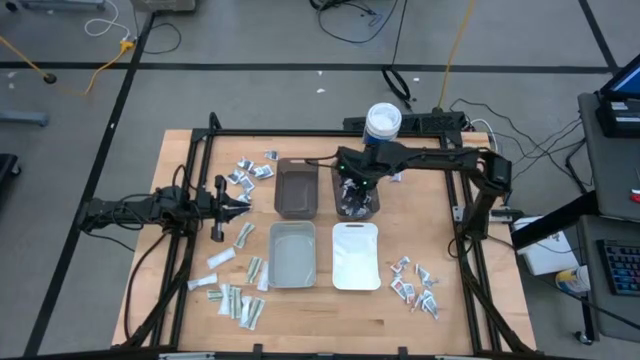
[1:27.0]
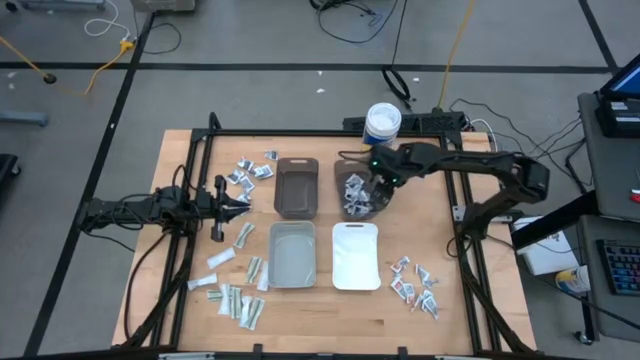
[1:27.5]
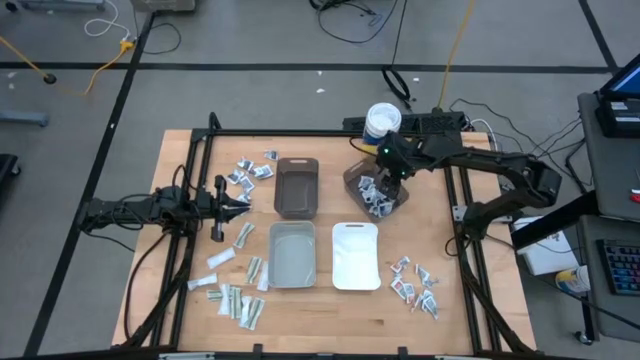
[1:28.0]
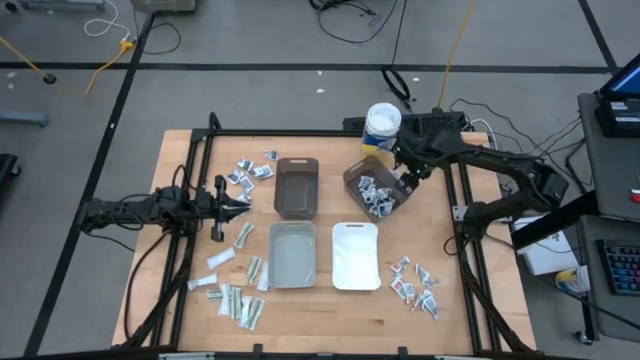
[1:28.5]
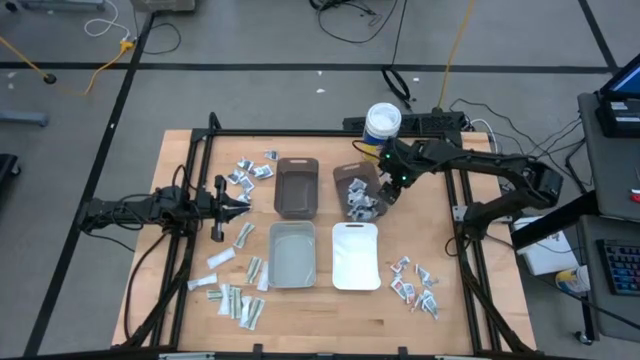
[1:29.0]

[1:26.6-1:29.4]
Task: Pick & Place First Aid Supplies
Adjust the right black bin on the table

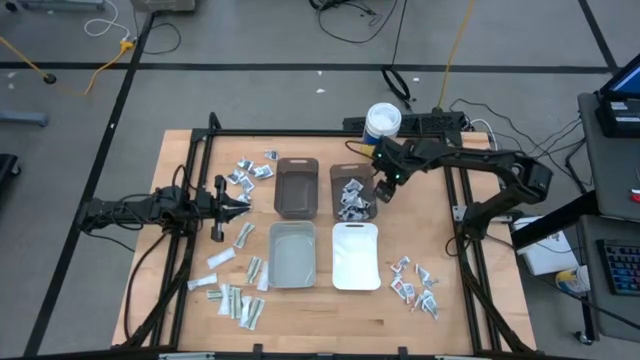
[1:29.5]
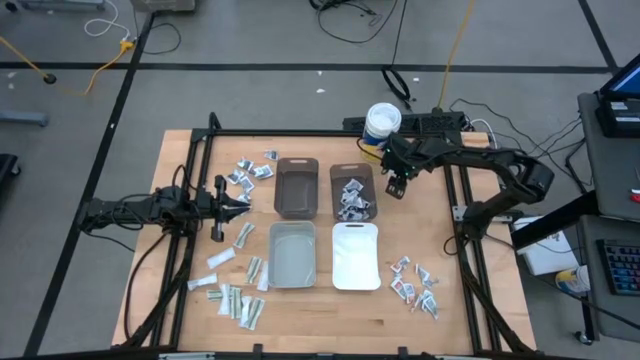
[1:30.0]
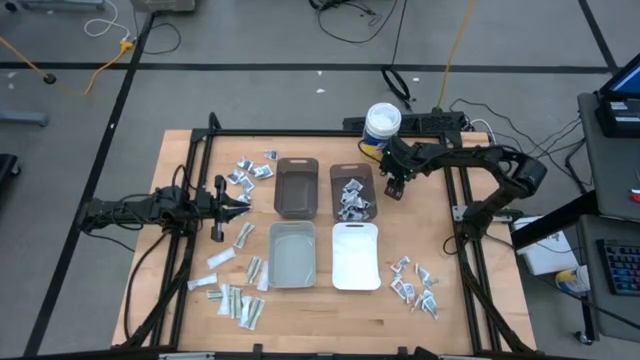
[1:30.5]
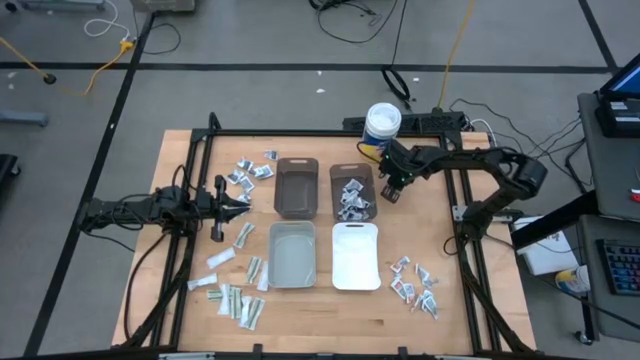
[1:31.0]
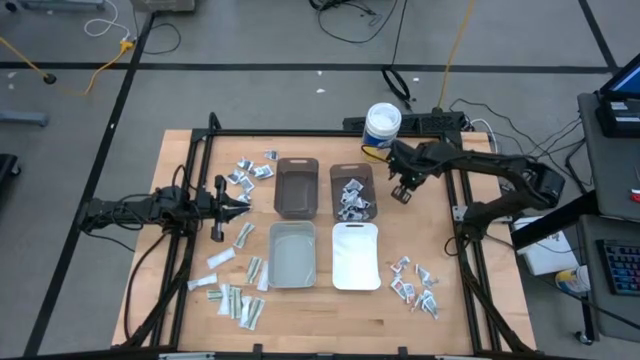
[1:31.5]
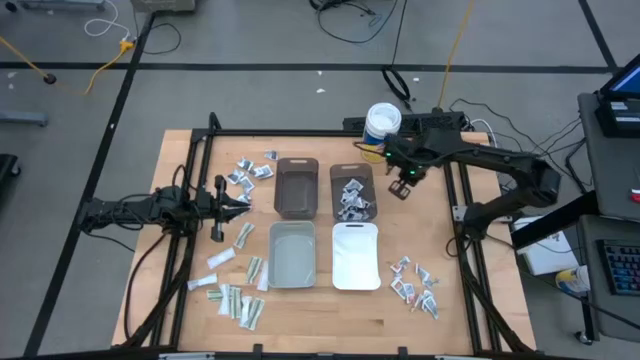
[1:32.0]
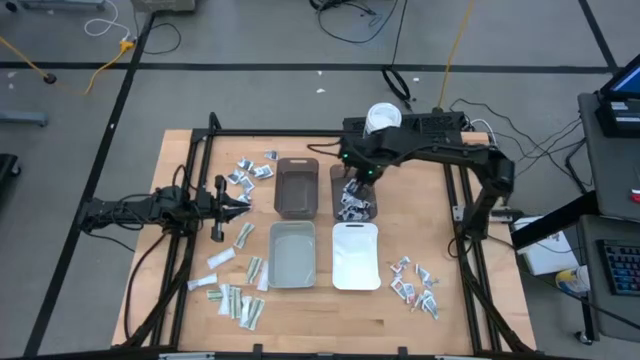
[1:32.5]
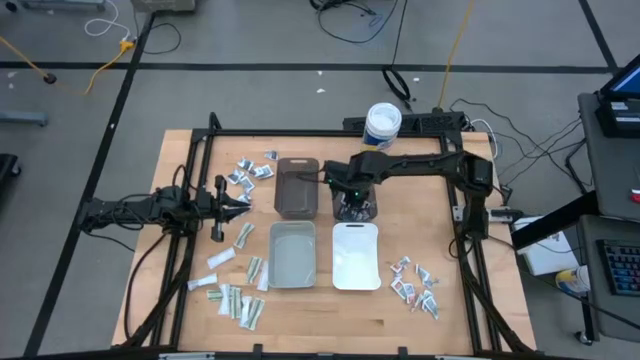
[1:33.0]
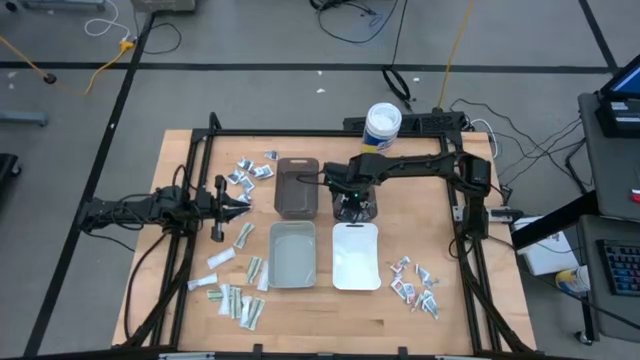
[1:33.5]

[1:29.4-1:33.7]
Put the blue pad into the right black bin

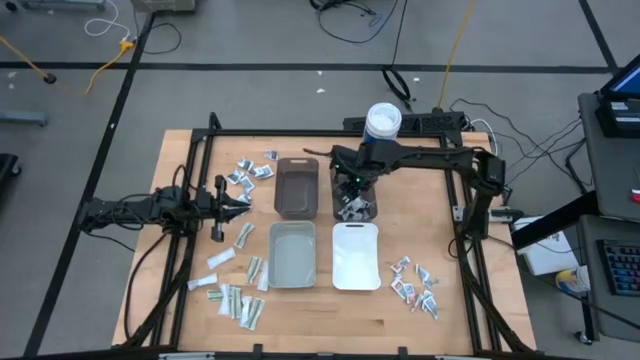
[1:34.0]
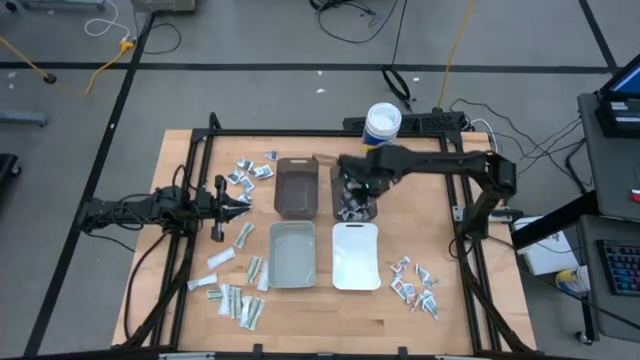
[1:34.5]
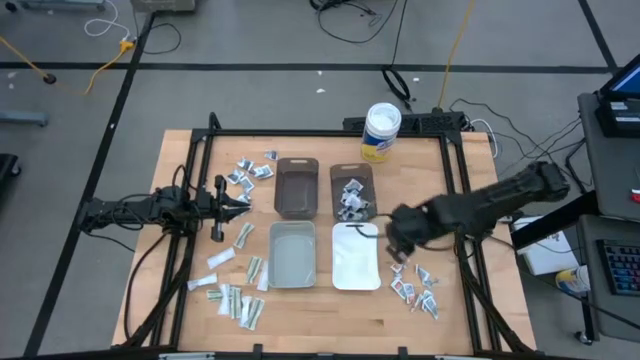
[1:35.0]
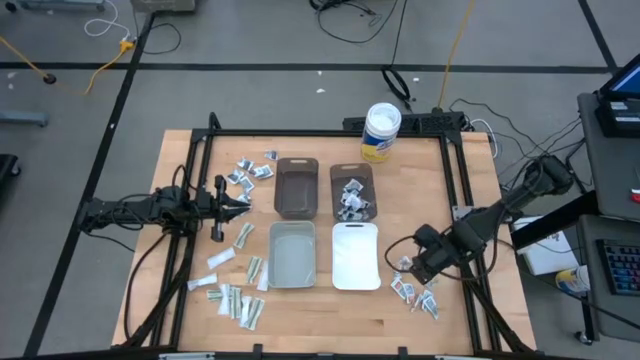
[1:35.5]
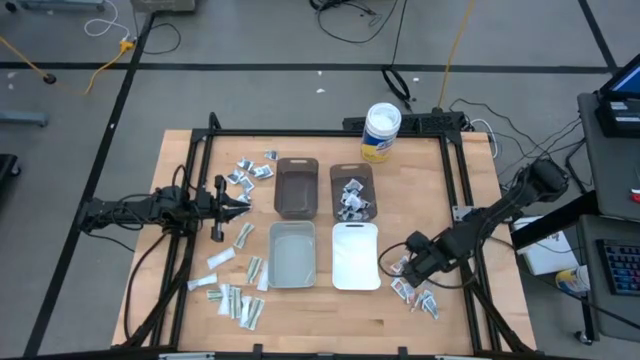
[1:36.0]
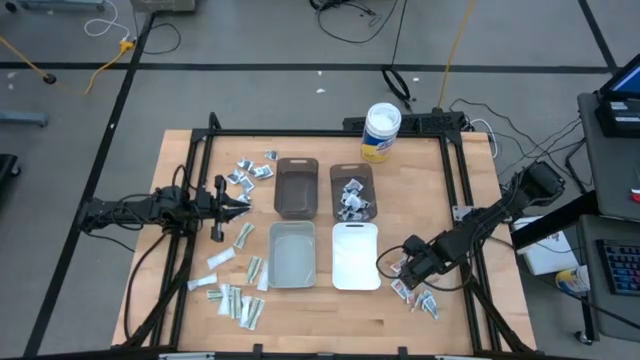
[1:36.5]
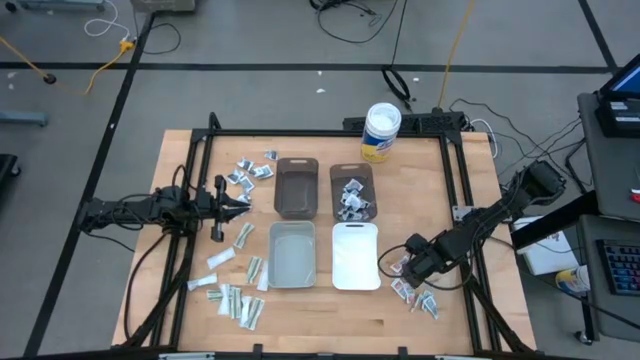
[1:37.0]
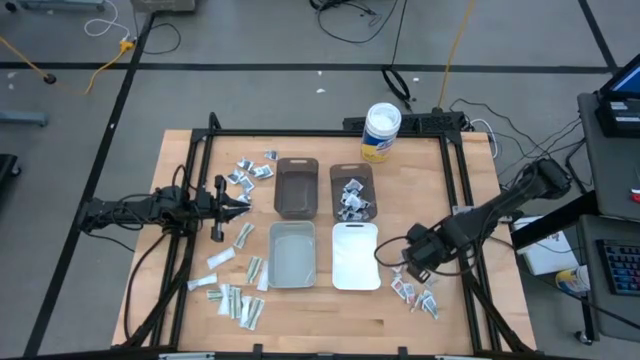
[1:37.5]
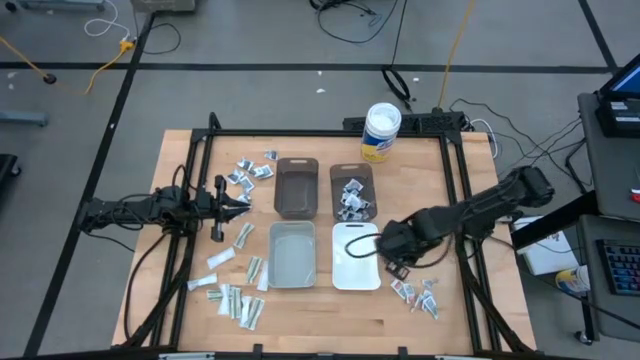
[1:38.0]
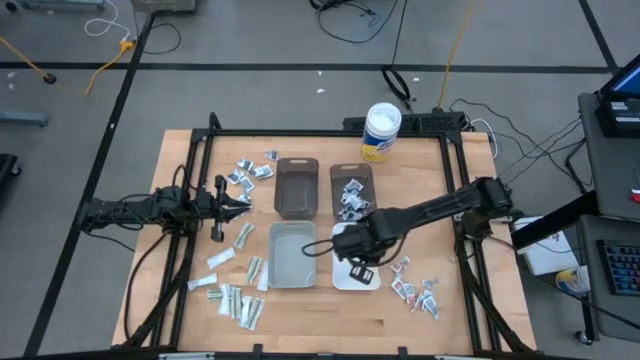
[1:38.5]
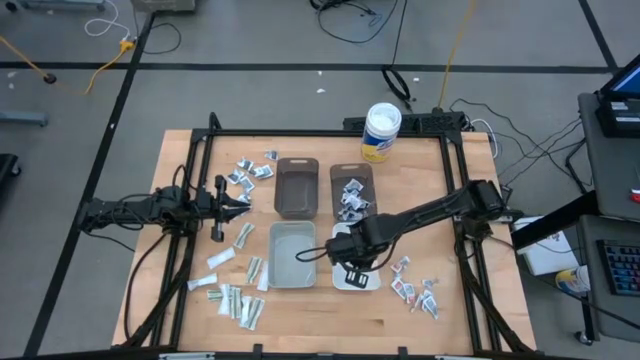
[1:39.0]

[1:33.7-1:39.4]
Put the orange pad into the white bin

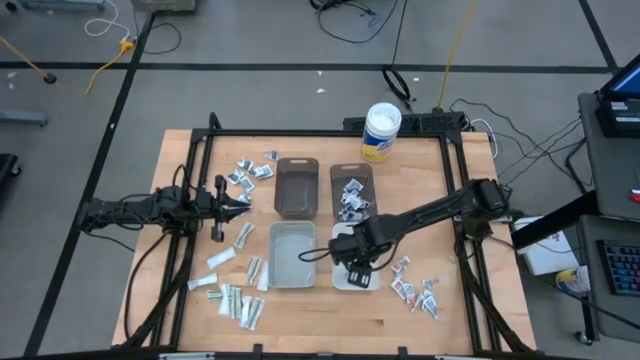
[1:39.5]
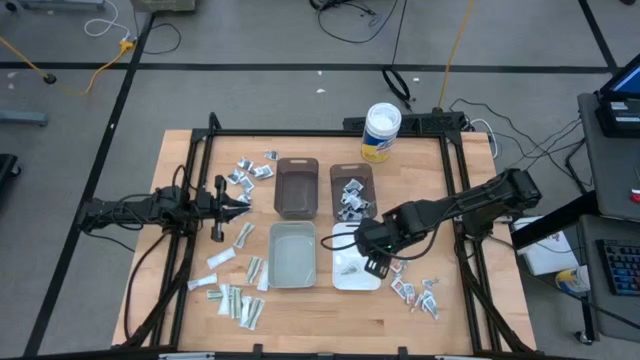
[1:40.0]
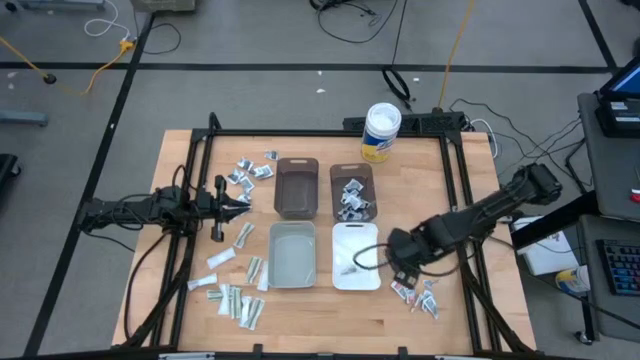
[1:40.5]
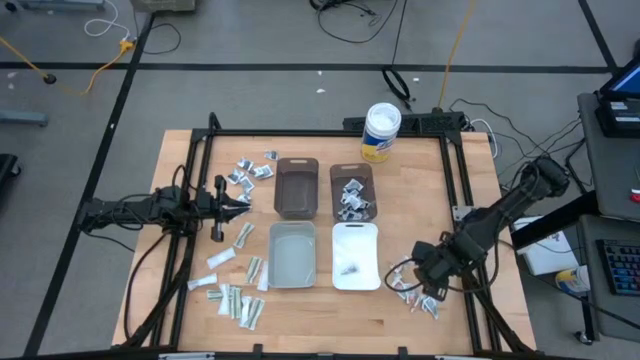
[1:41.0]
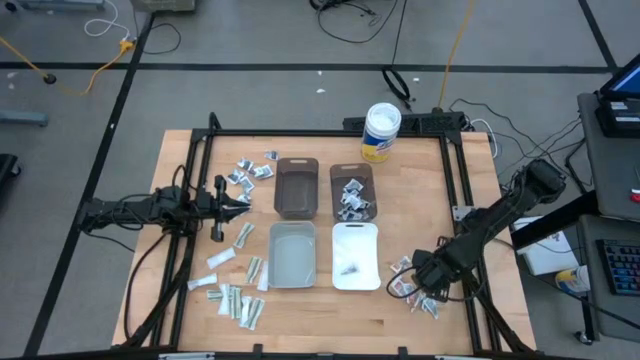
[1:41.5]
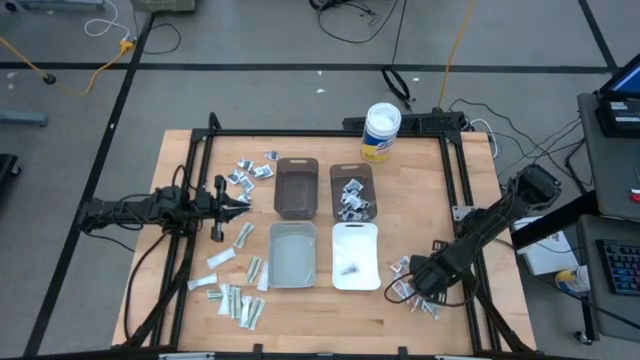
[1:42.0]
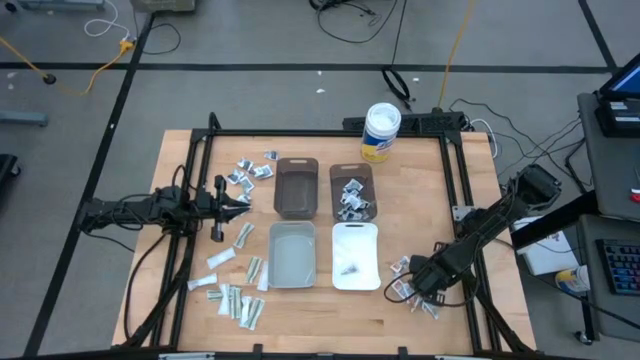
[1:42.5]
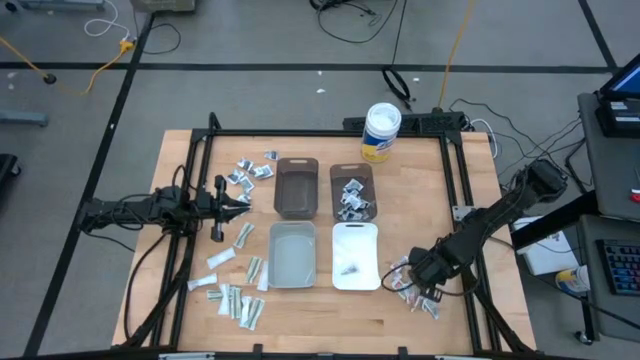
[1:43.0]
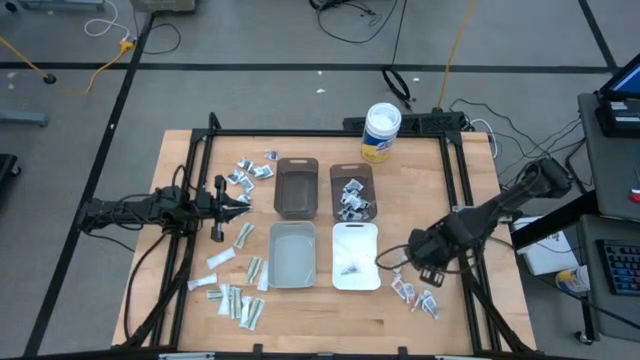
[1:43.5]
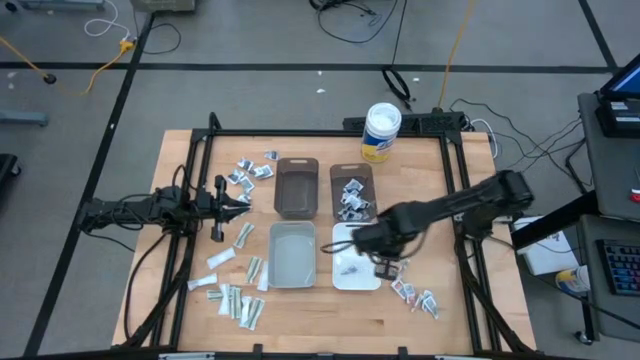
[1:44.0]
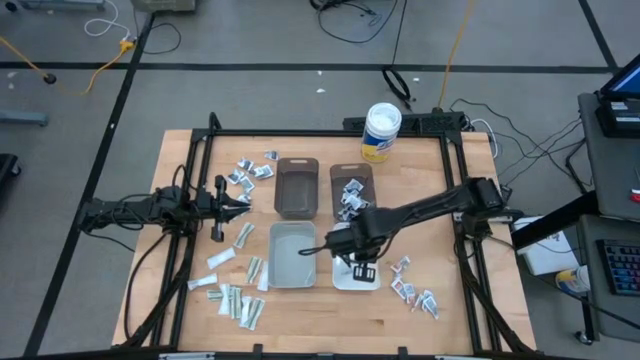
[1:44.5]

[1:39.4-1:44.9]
Put the orange pad into the white bin

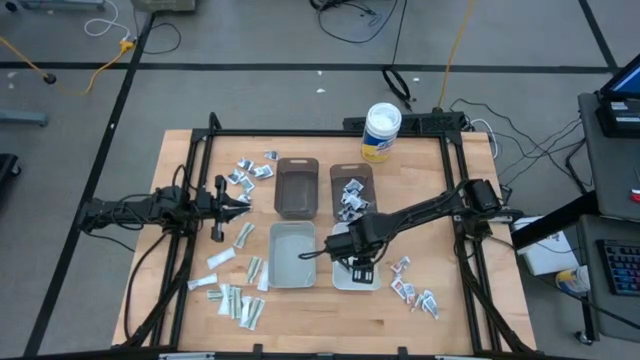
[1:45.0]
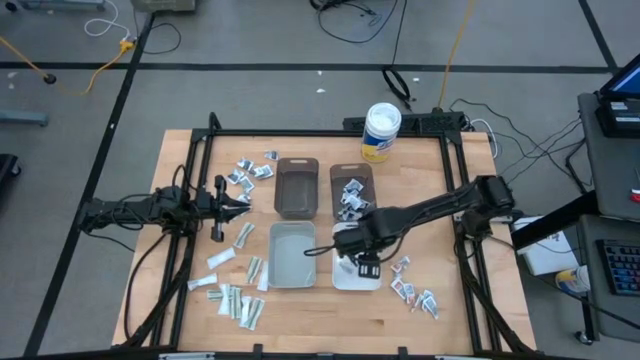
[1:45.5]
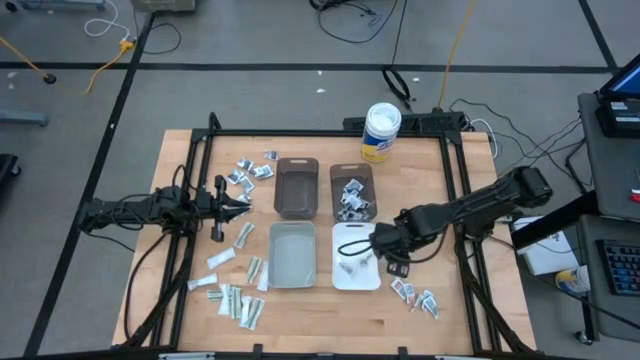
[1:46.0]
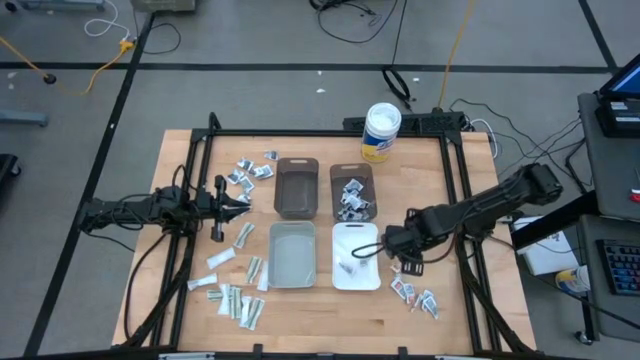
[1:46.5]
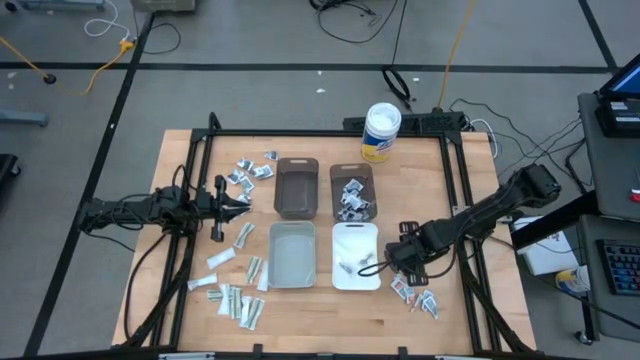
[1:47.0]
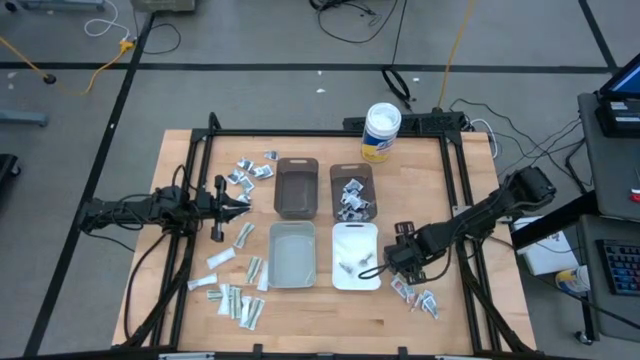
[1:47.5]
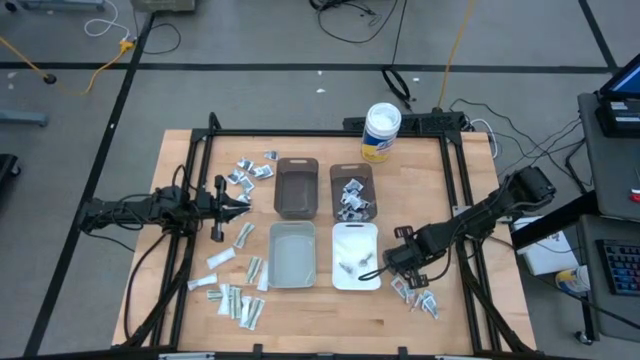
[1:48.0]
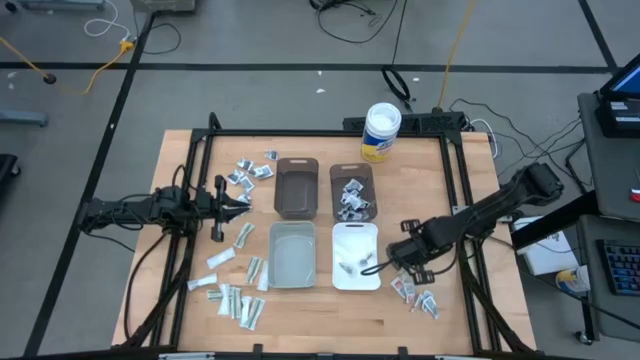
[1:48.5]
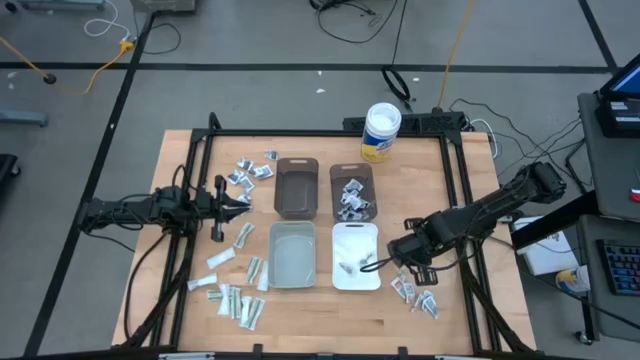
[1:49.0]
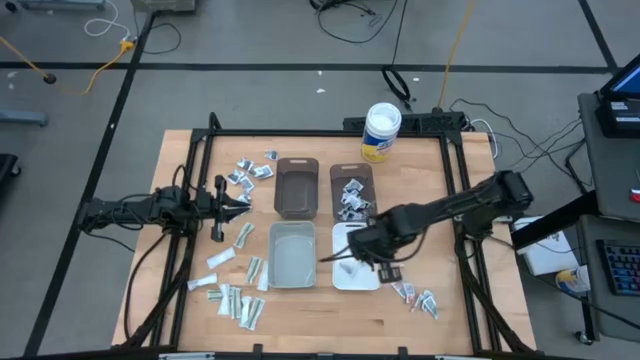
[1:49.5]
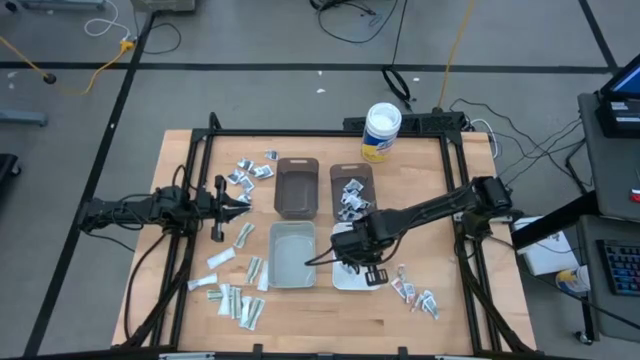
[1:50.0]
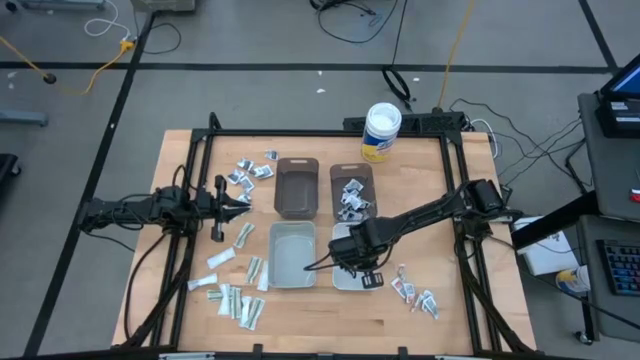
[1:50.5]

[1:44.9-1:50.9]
Put the orange pad into the white bin
